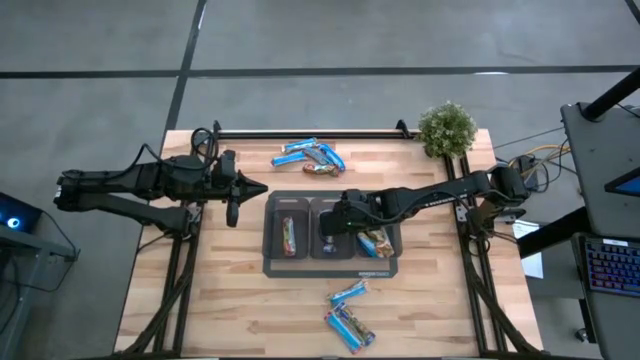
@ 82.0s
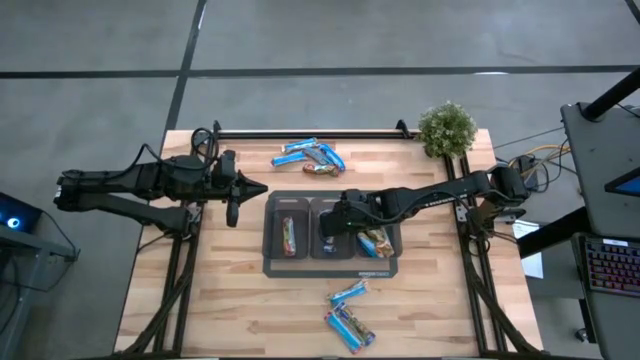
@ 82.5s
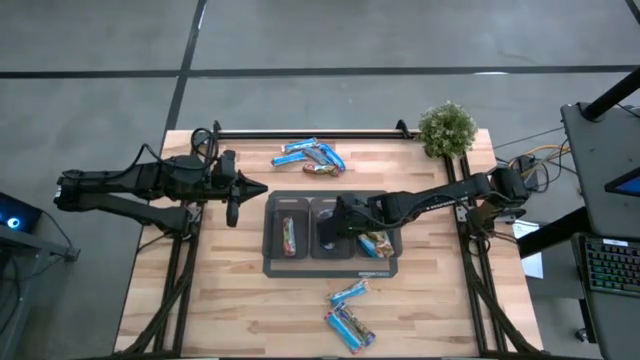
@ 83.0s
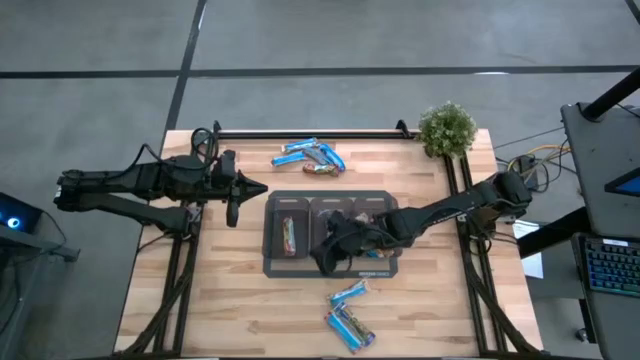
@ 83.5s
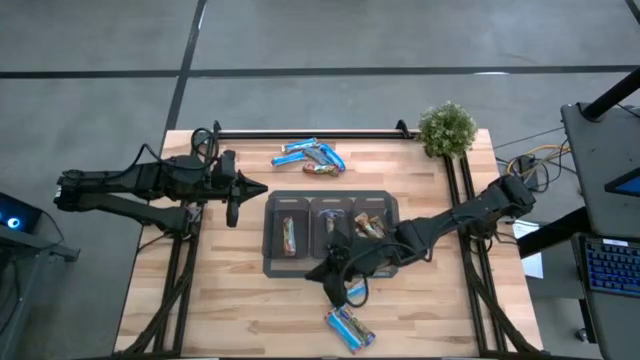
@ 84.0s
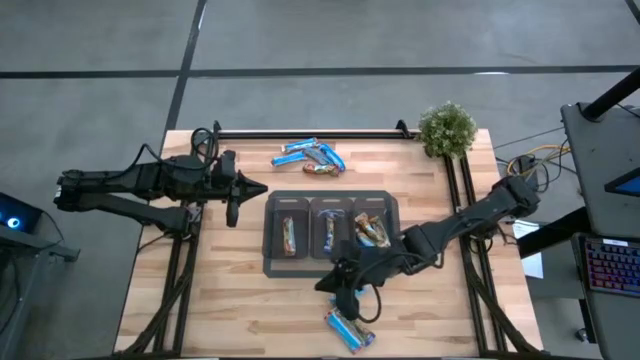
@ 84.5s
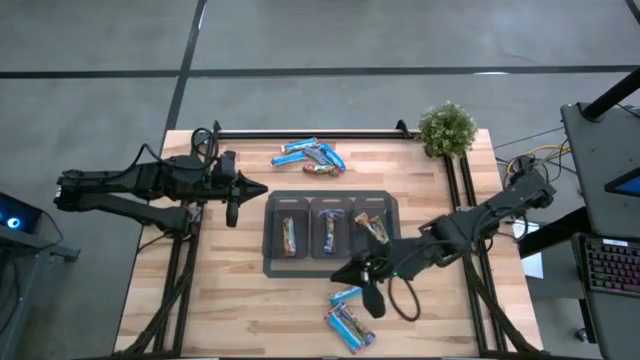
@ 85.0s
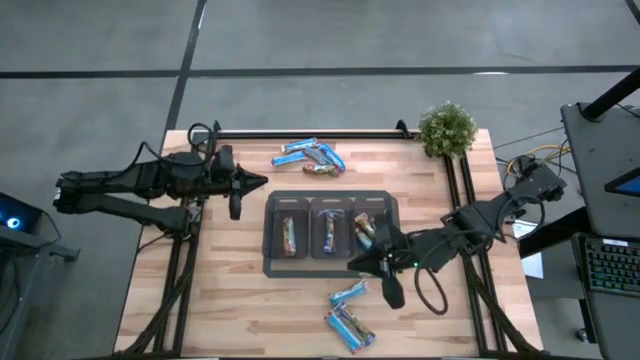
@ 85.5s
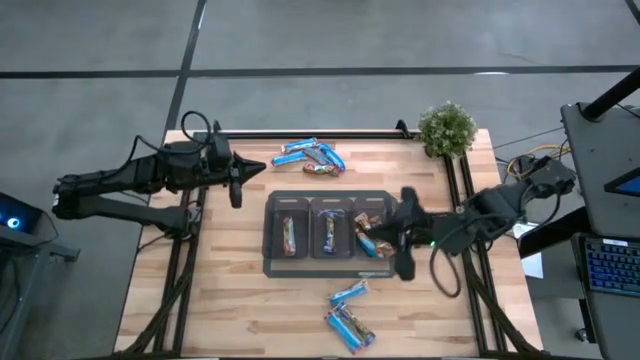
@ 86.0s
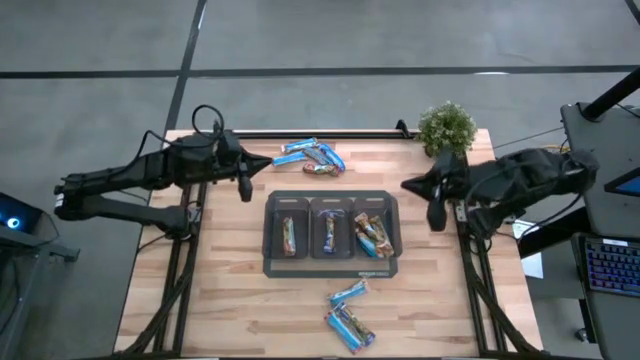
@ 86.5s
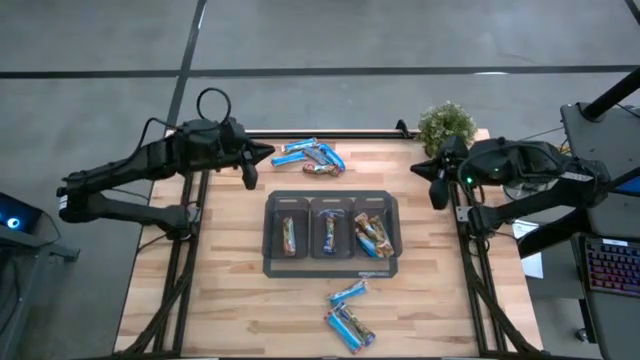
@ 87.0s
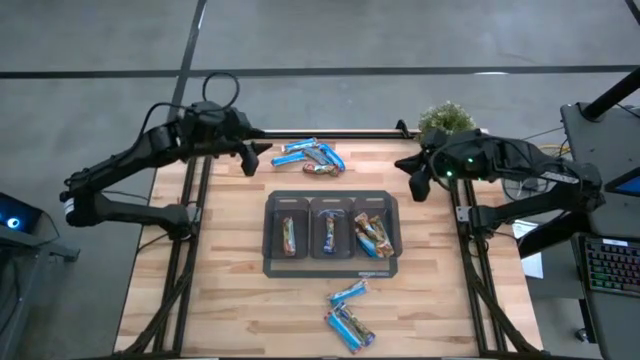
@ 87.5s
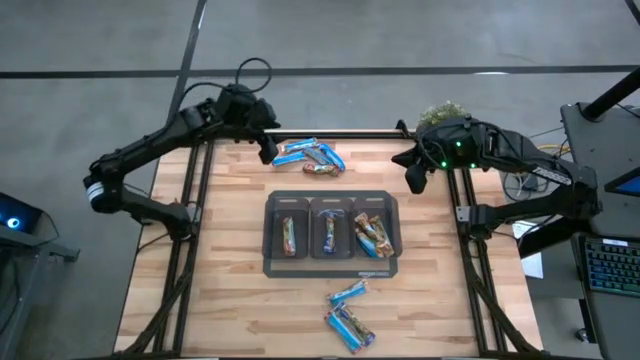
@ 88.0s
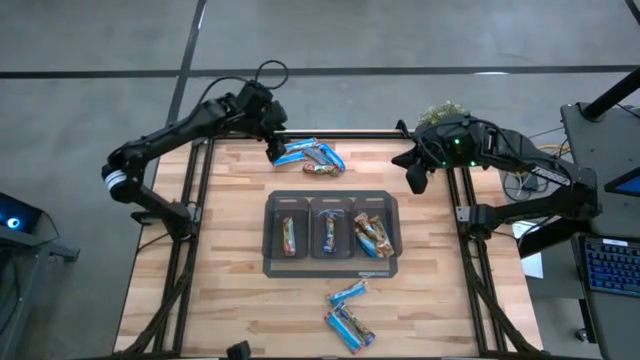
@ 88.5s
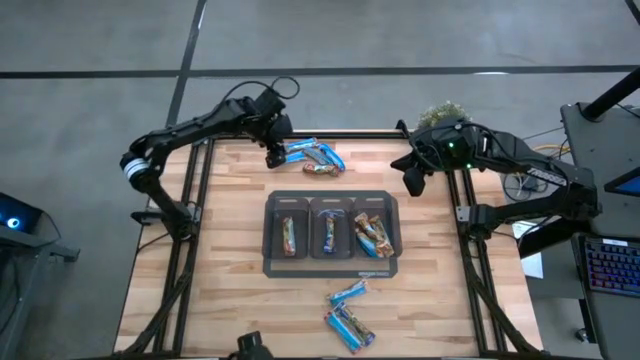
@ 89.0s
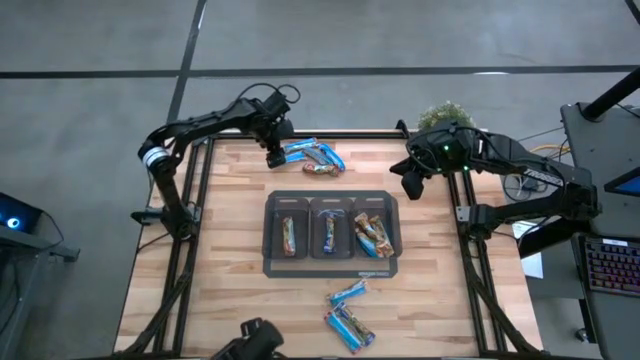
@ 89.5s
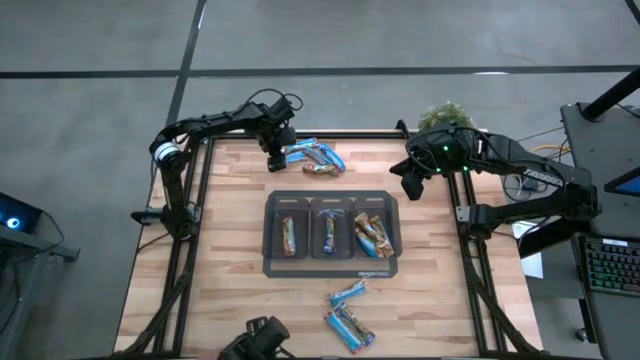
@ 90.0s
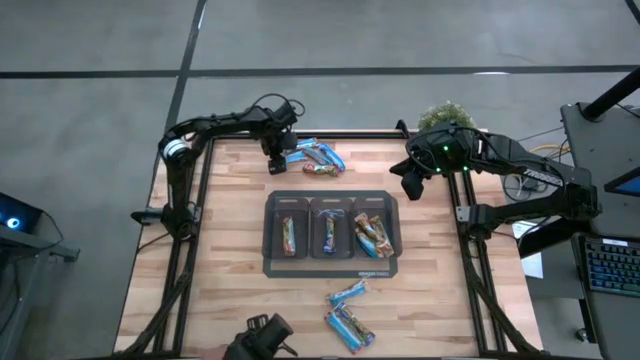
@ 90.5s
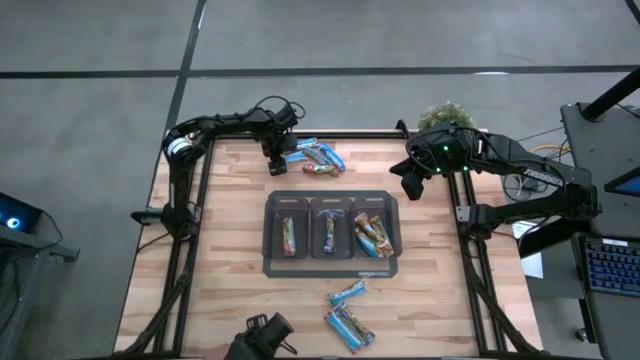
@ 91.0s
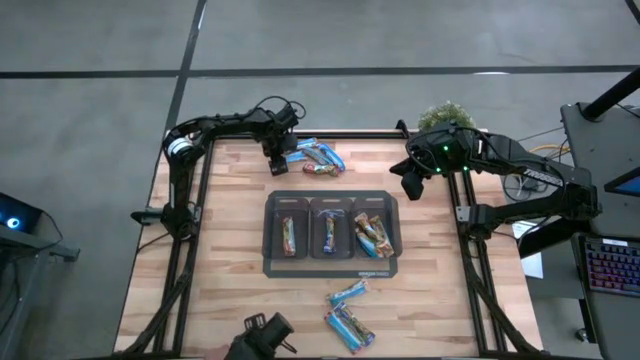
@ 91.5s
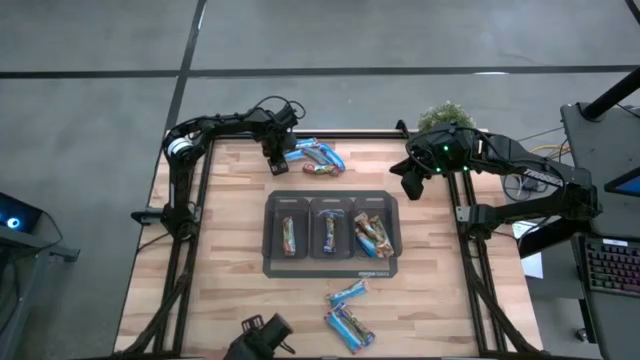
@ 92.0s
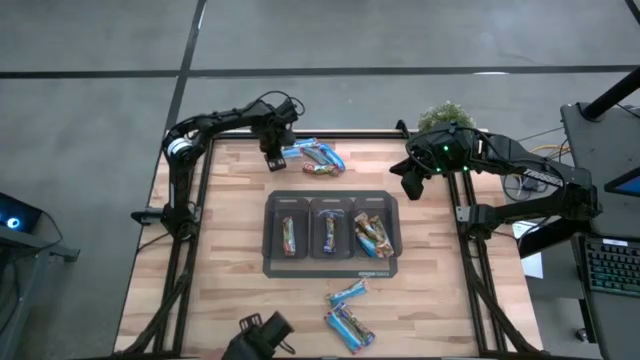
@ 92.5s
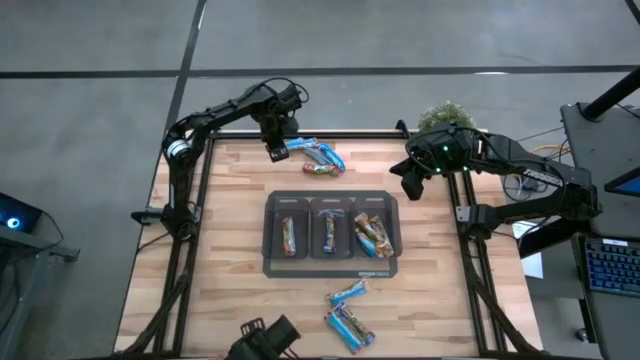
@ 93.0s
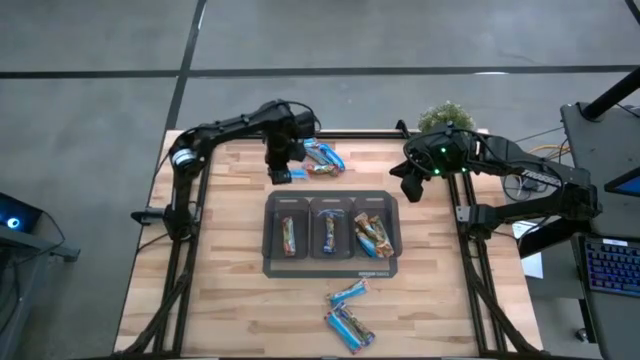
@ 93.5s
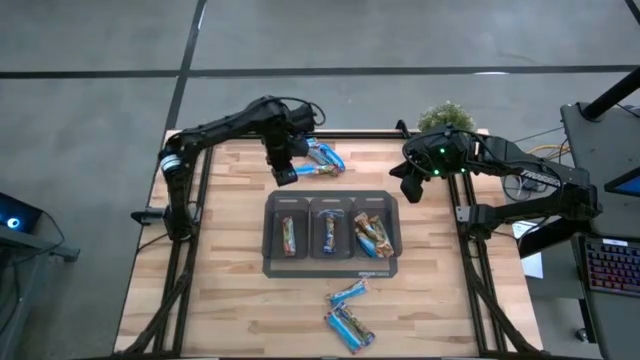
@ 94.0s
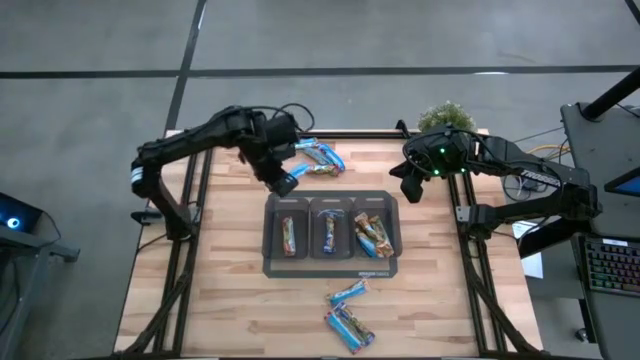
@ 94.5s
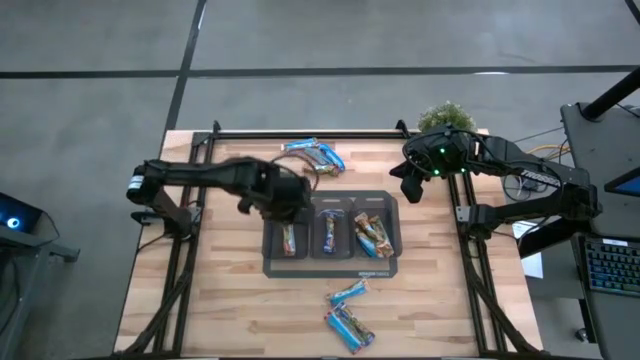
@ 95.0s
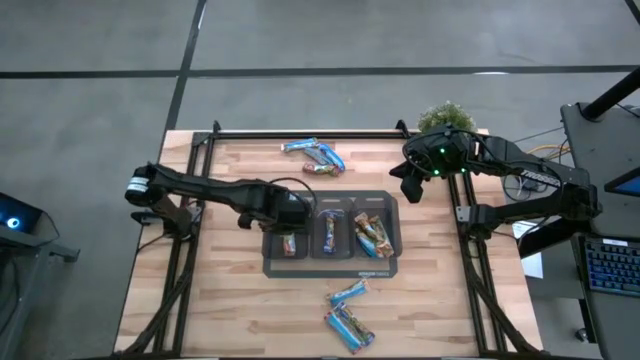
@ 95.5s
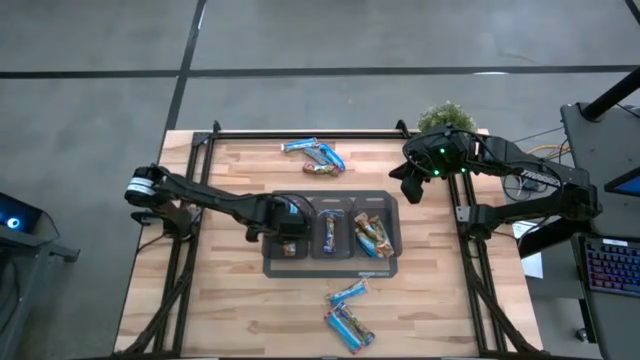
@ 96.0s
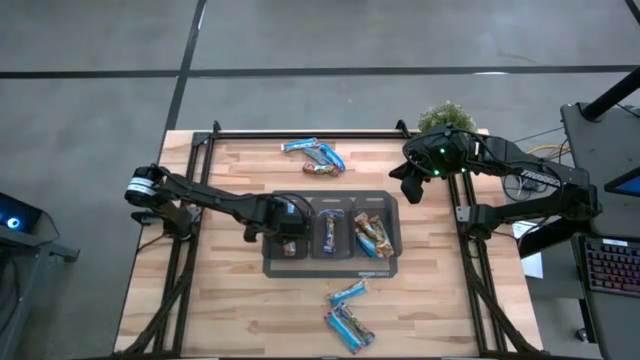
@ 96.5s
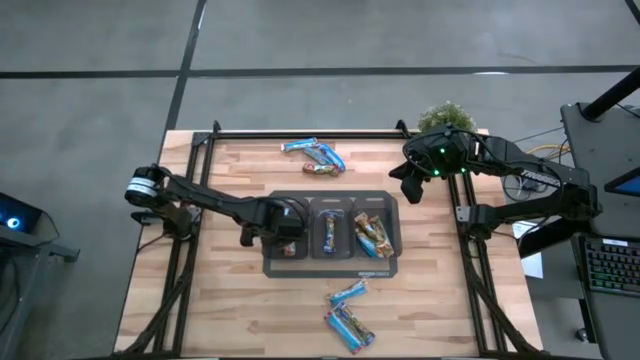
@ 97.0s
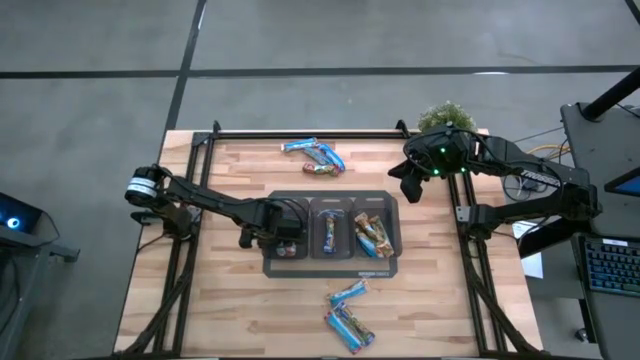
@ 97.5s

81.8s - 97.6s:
Task: Pick and place Granola Bars by type
Put the red granola bar into the left black bin
